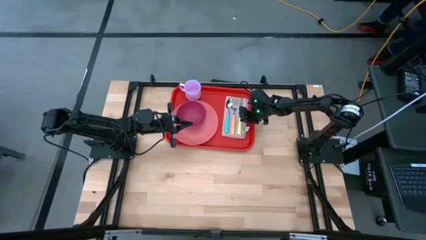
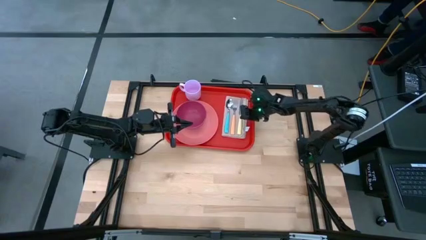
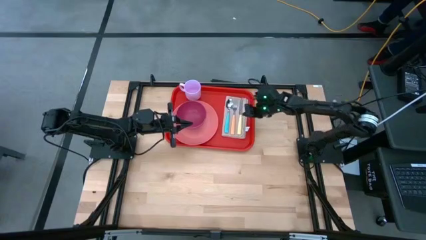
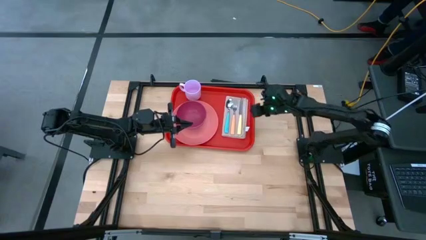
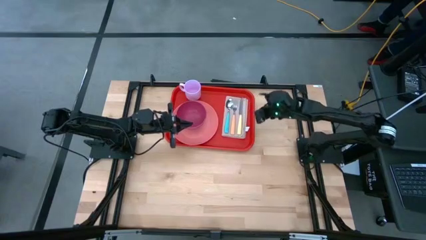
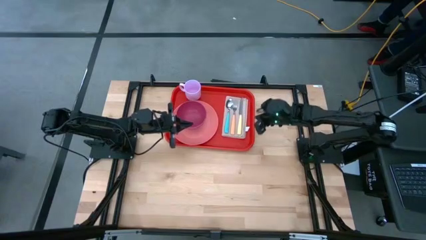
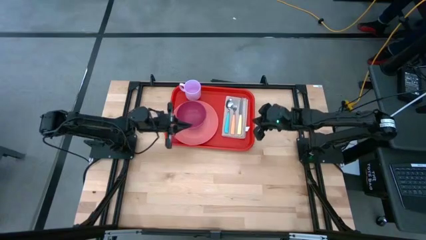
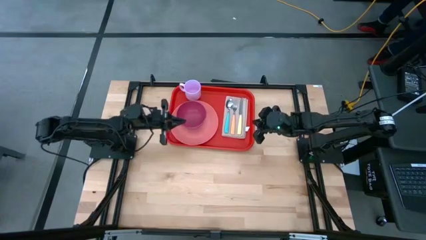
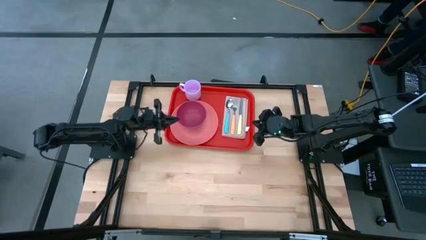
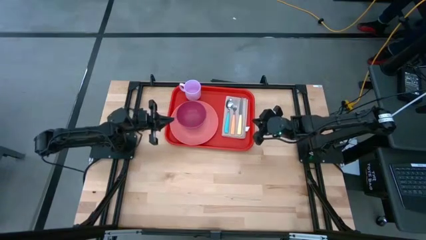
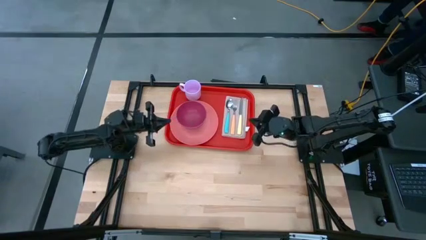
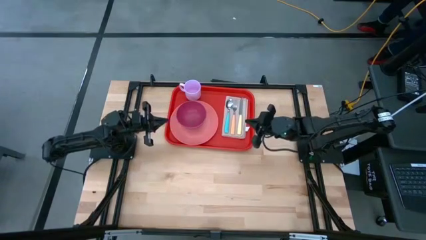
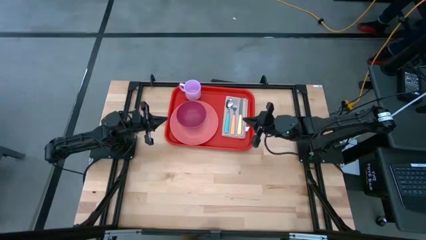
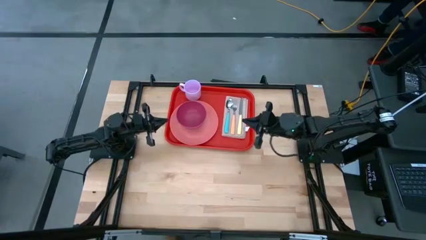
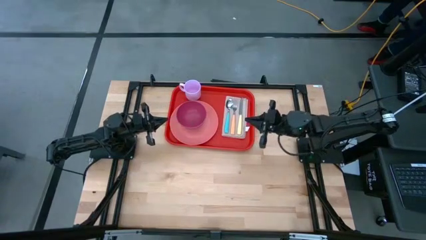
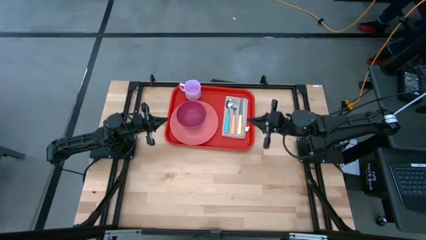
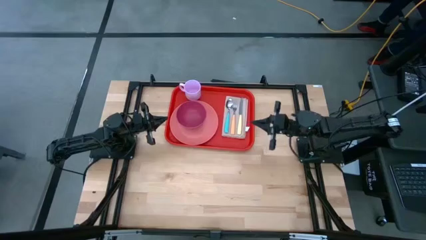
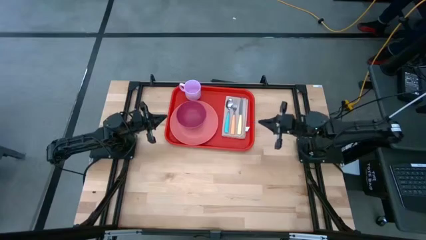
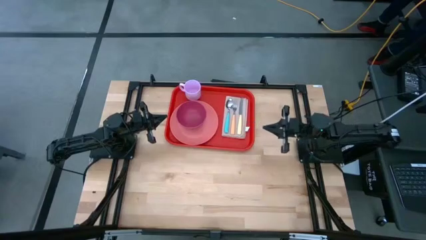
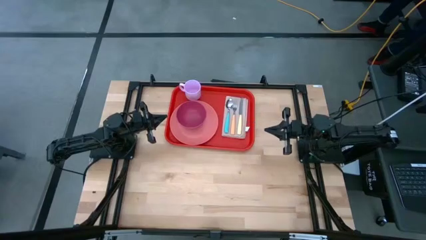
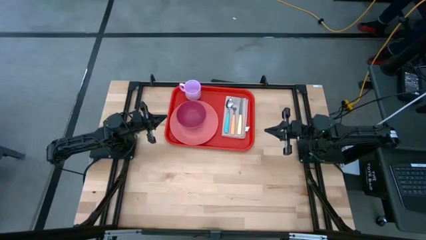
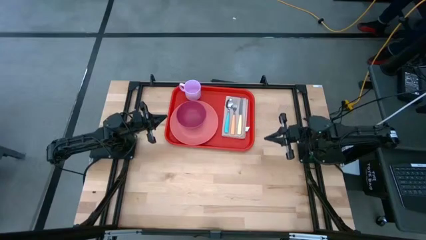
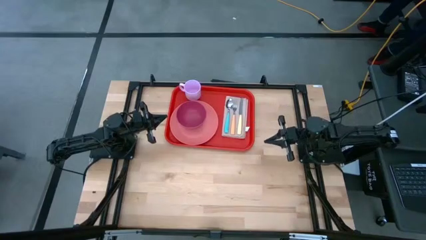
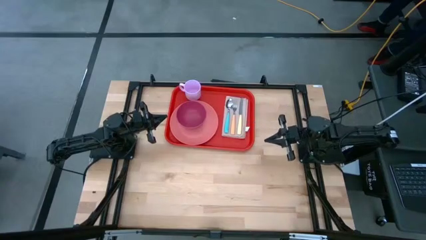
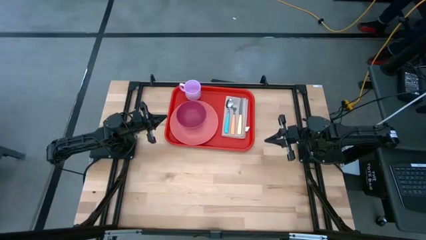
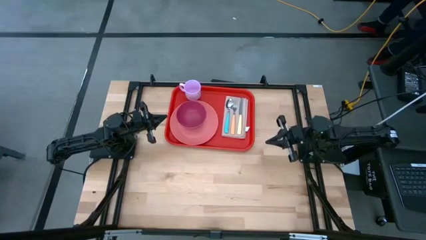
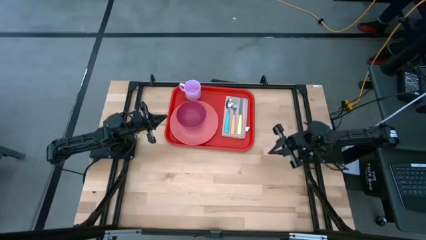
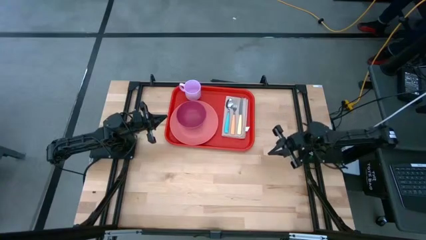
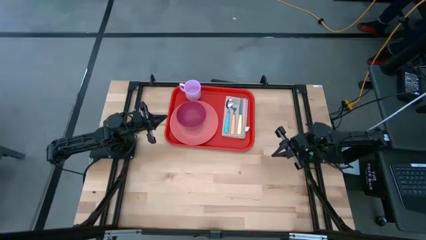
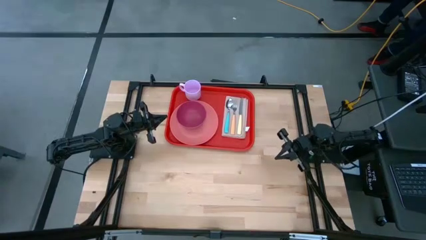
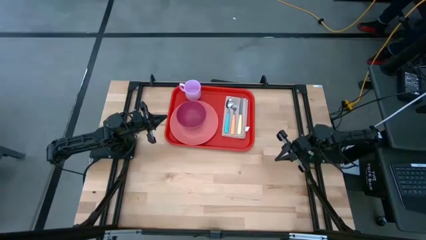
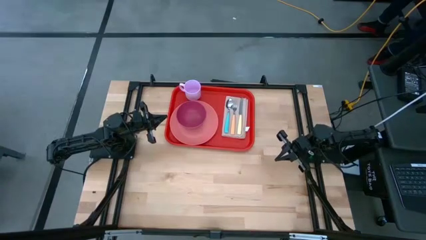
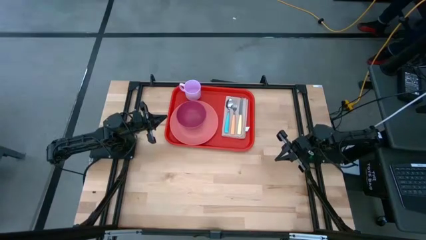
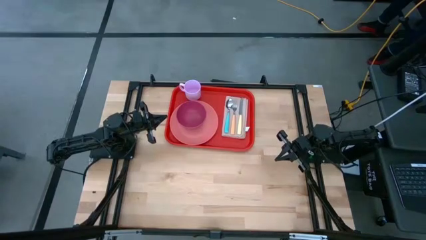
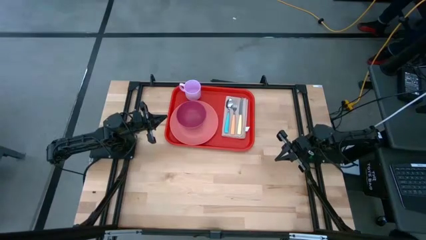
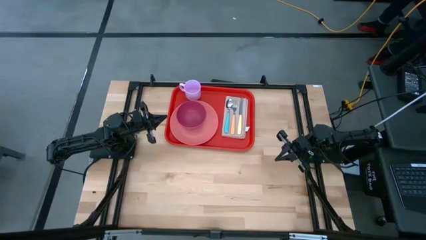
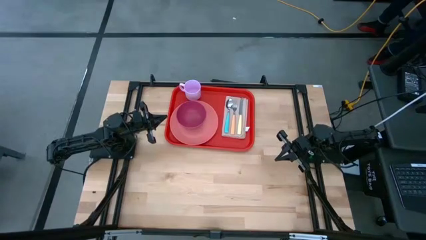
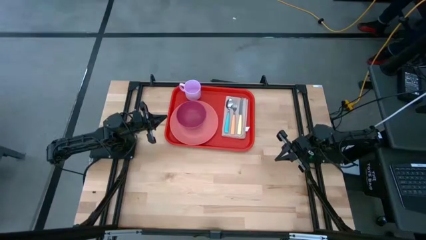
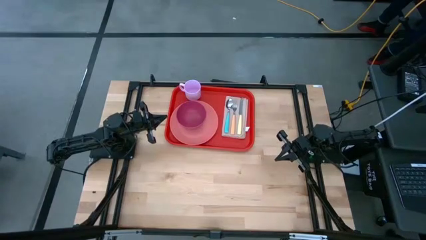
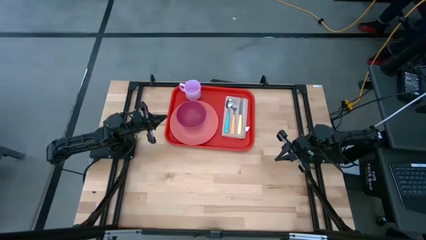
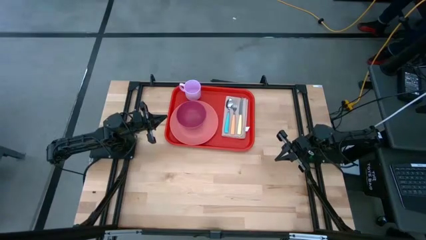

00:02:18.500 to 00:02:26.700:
Task: Set up tray
Return to Home Position

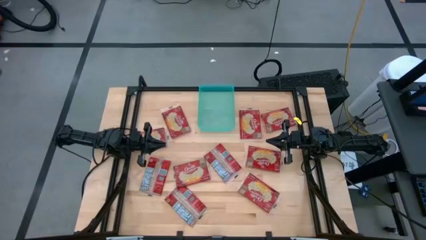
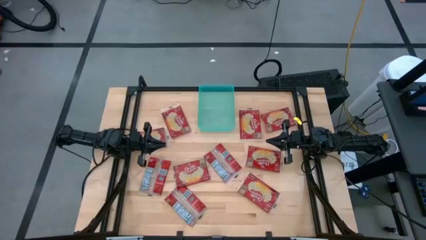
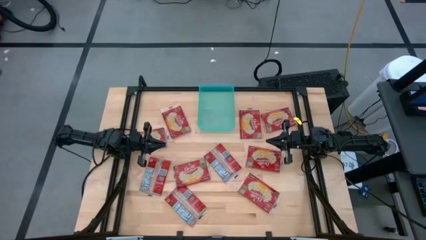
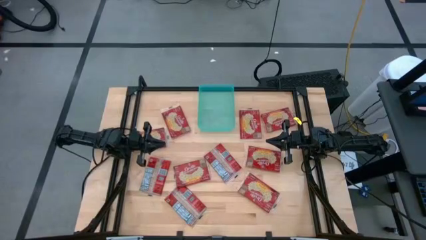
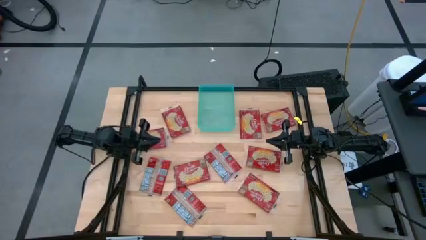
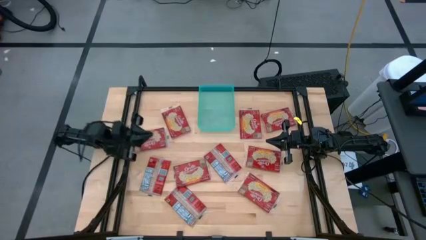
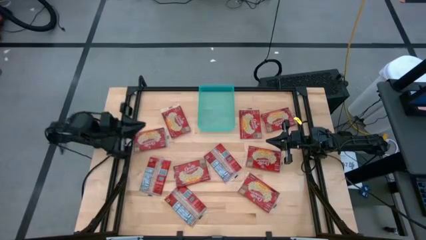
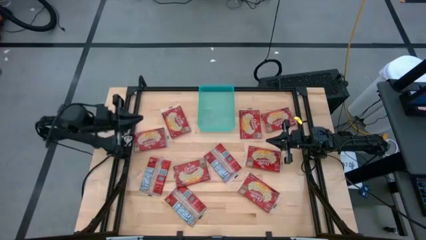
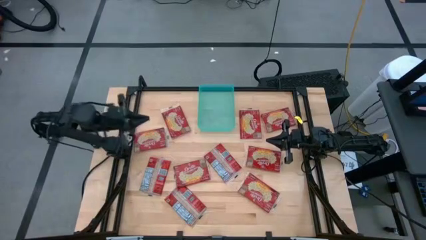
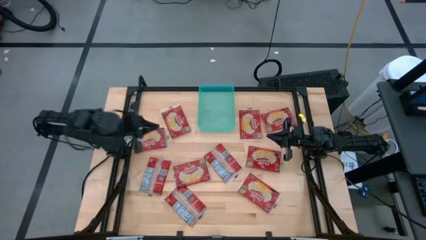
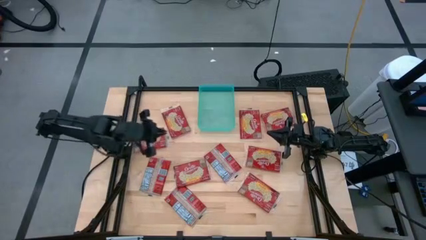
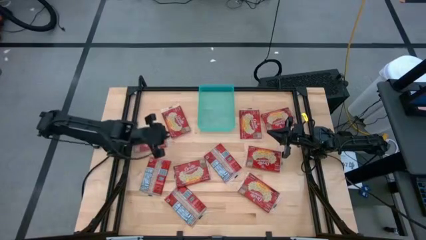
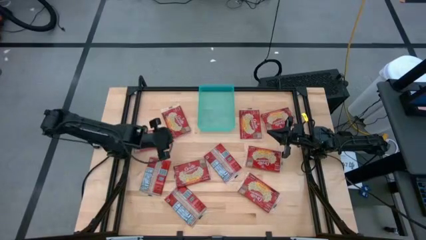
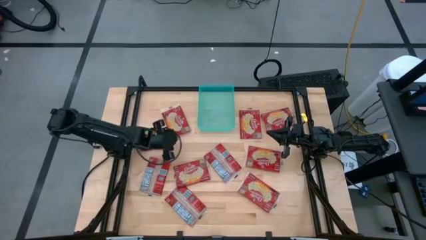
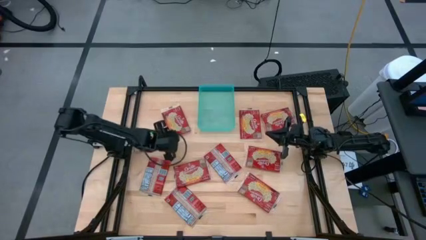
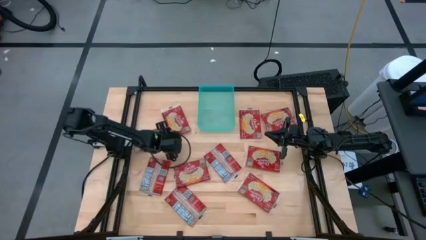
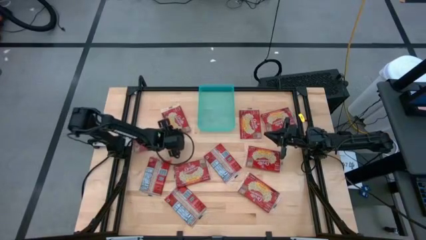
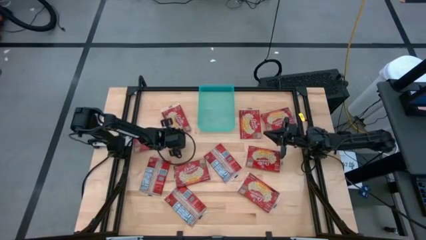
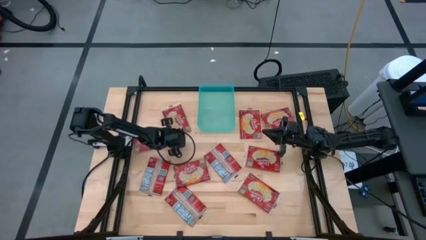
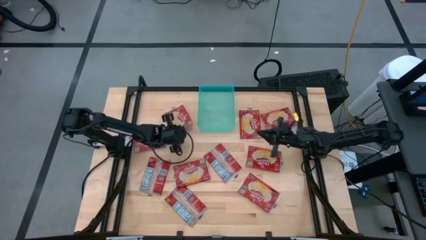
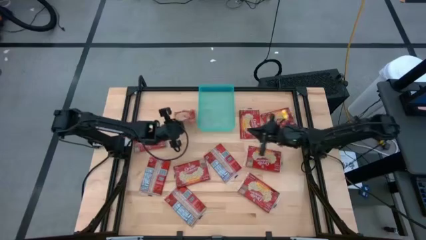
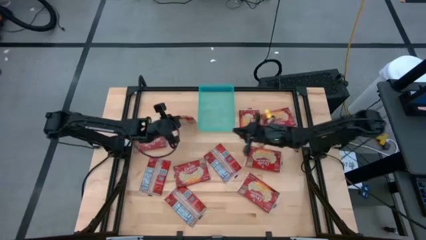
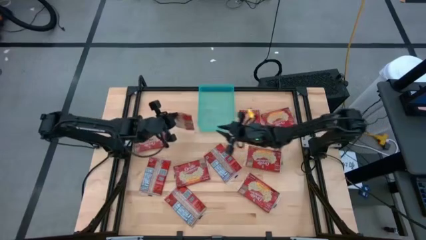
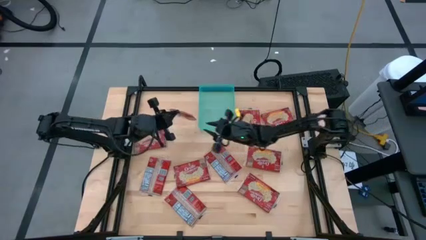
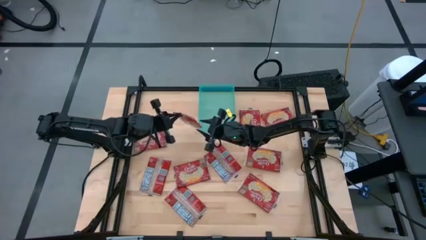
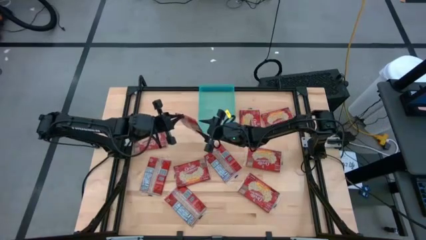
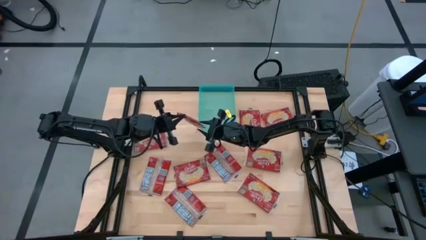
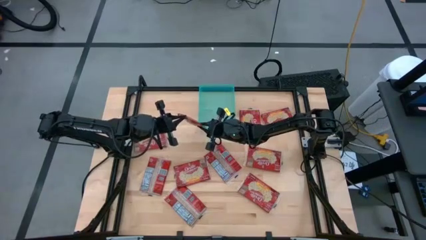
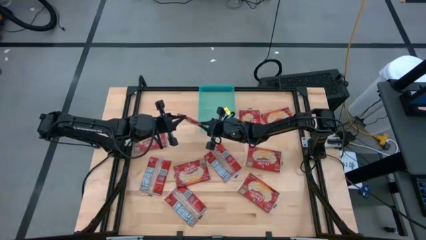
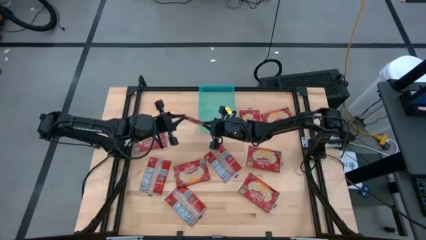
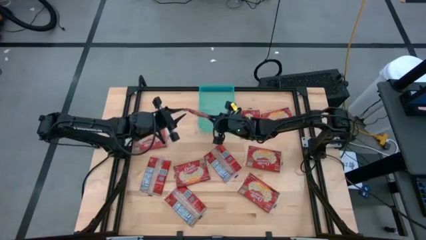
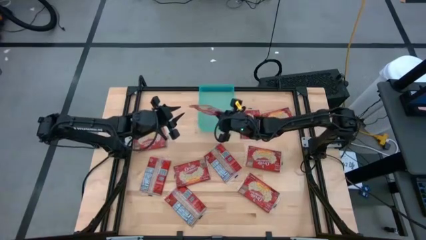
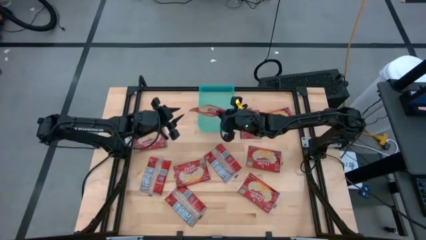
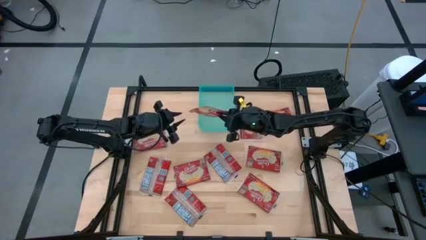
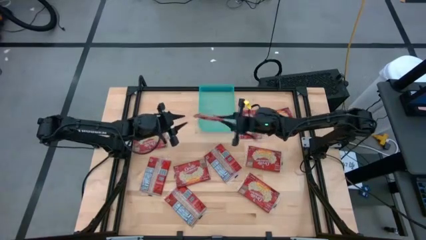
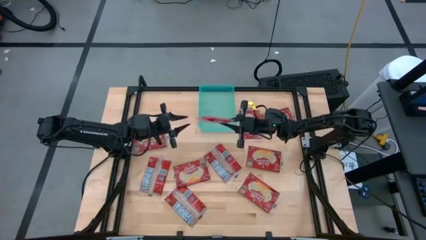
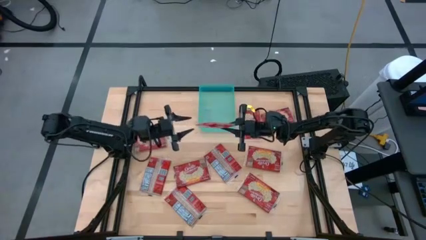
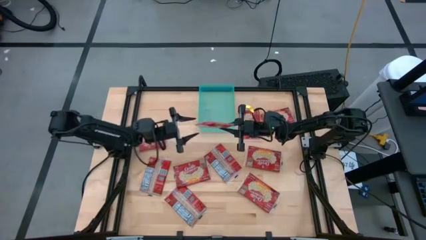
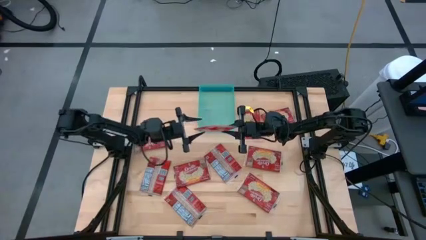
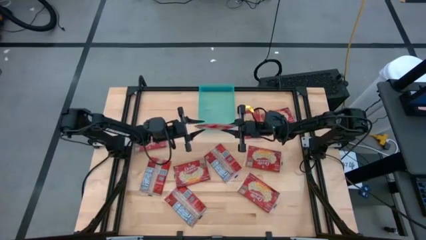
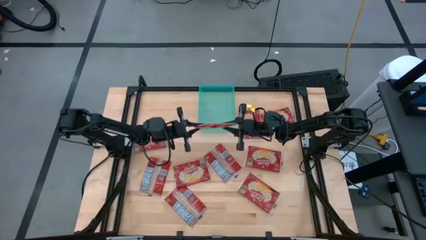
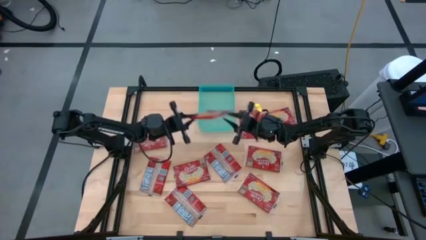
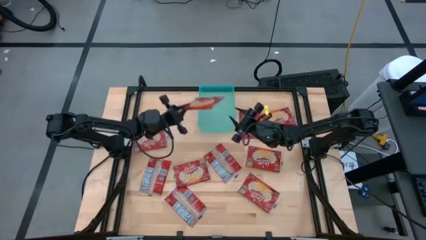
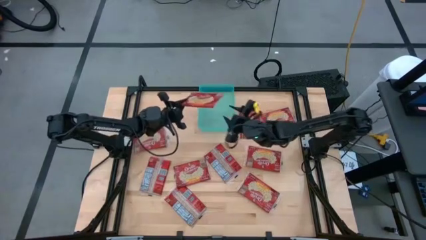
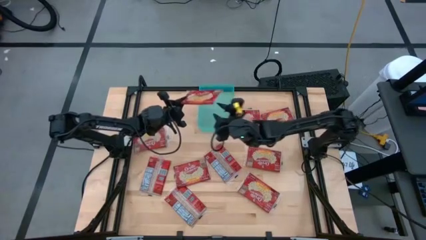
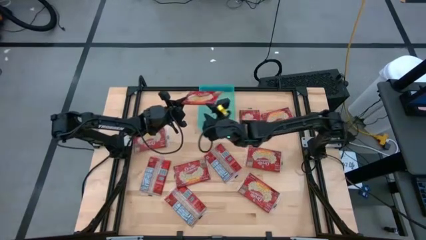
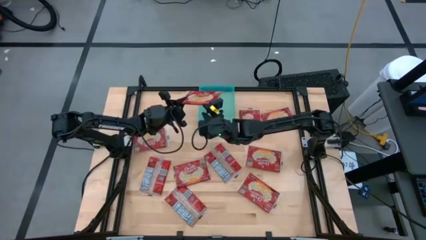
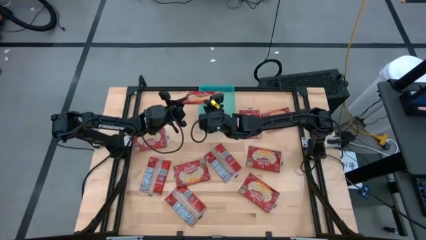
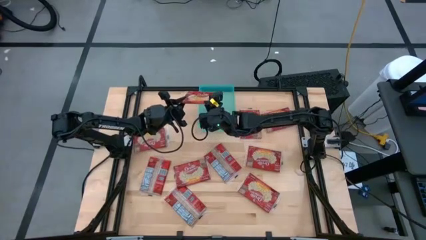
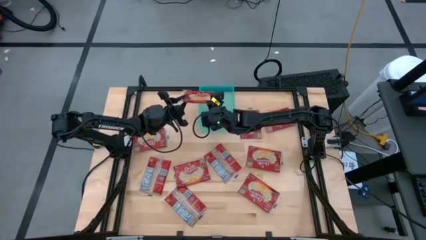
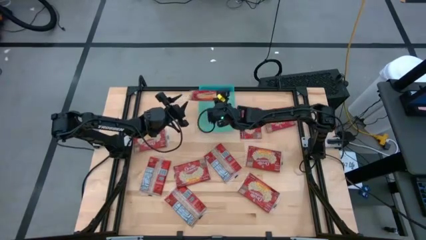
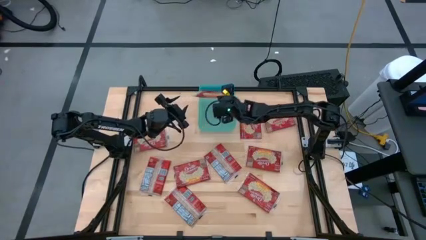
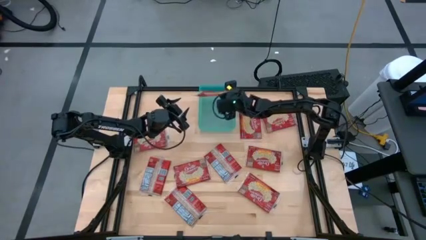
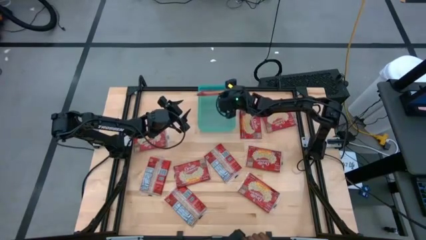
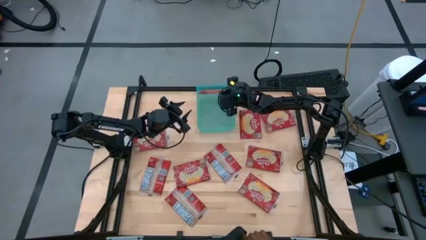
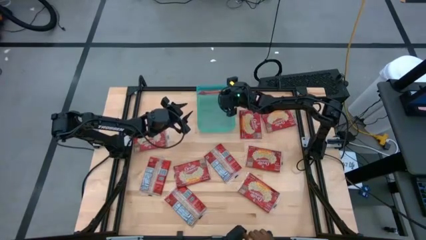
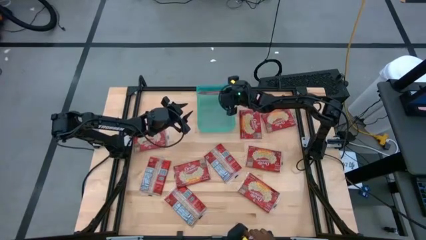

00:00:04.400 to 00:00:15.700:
Task: Sort popcorn bags into baskets
Put the red popcorn bag into the blue bin
